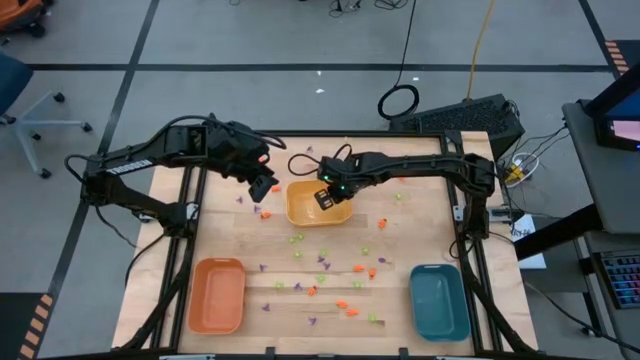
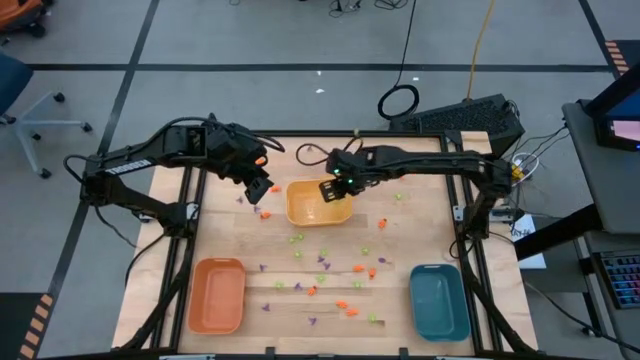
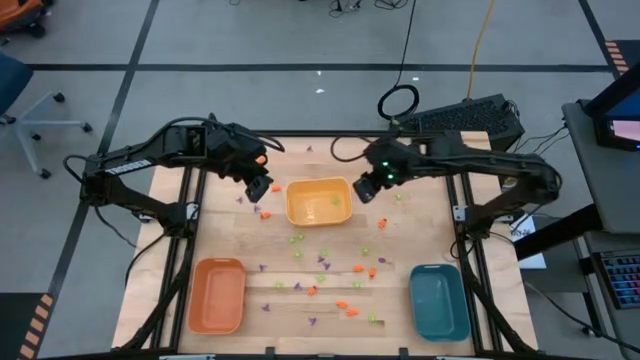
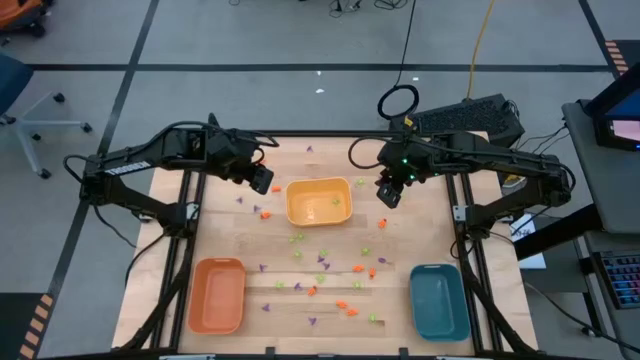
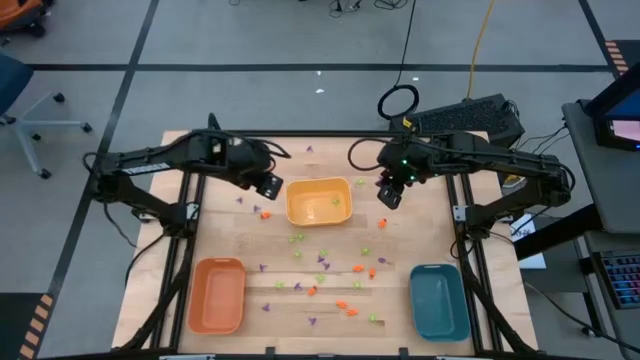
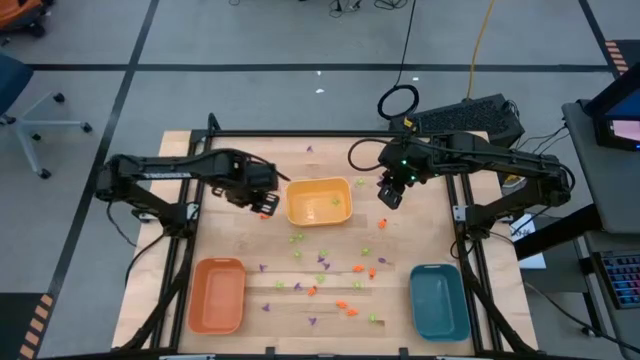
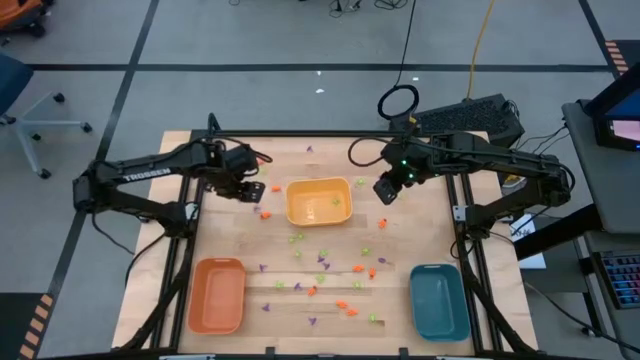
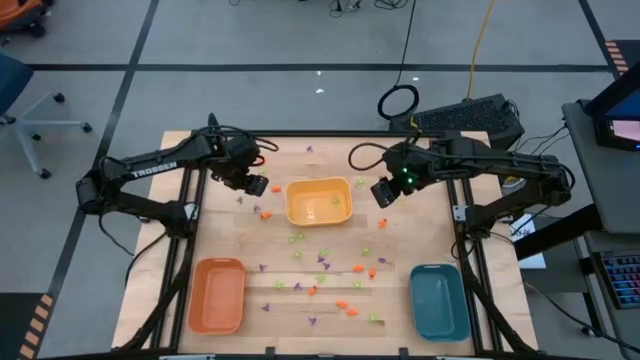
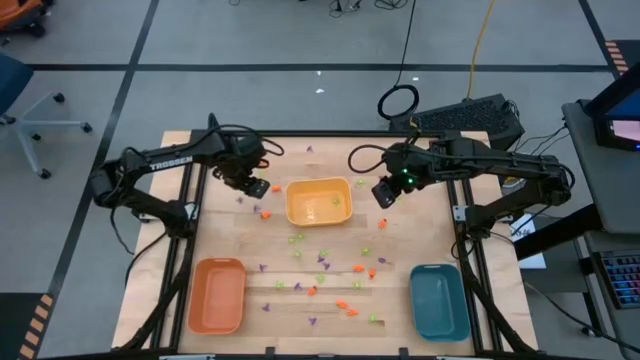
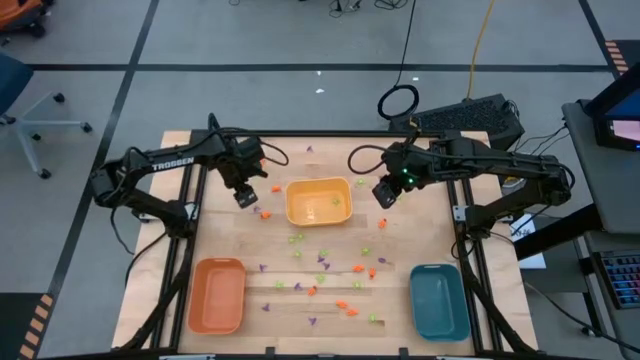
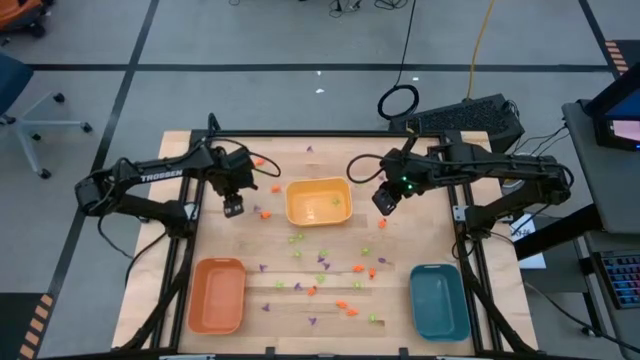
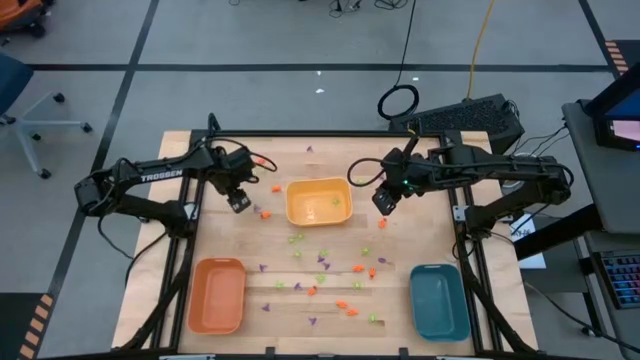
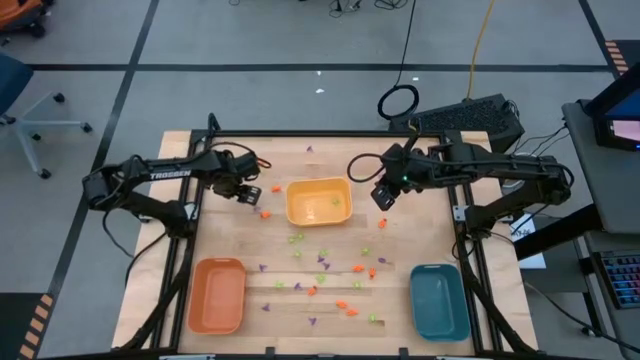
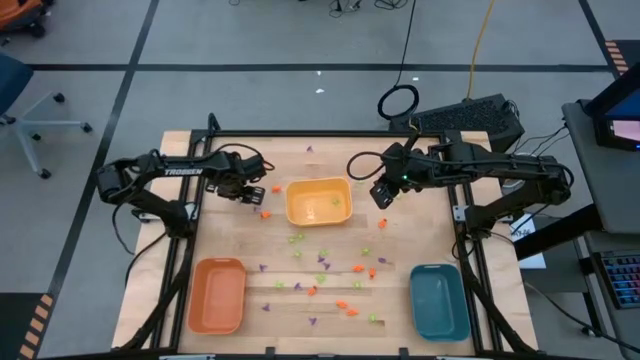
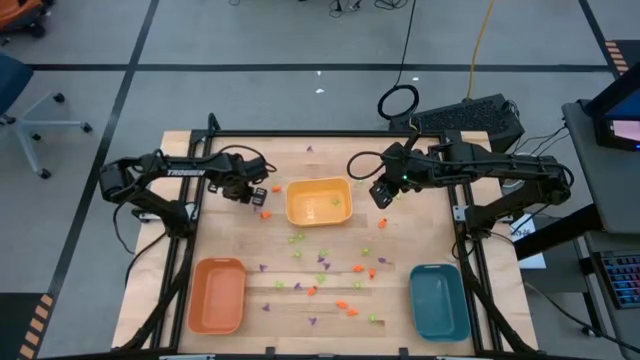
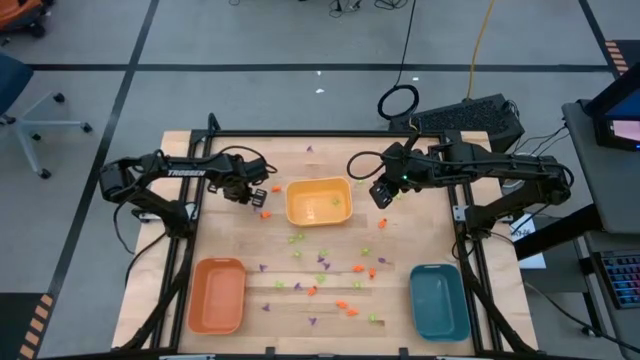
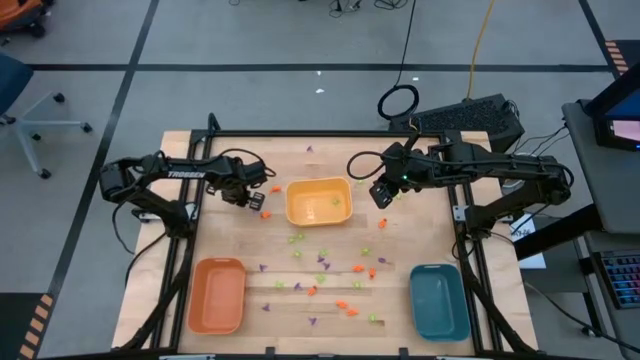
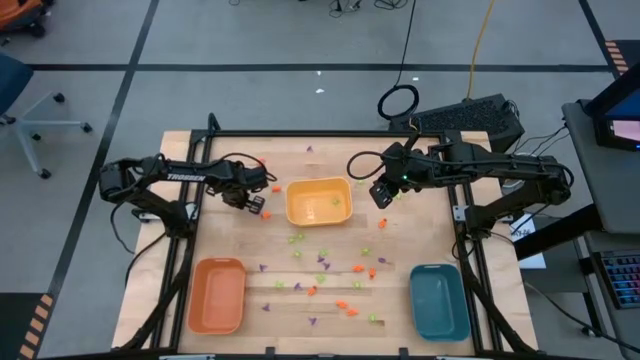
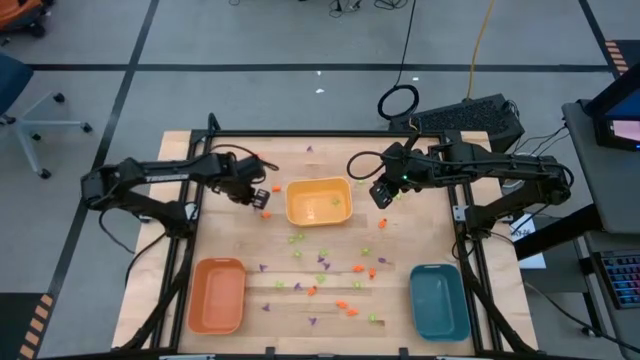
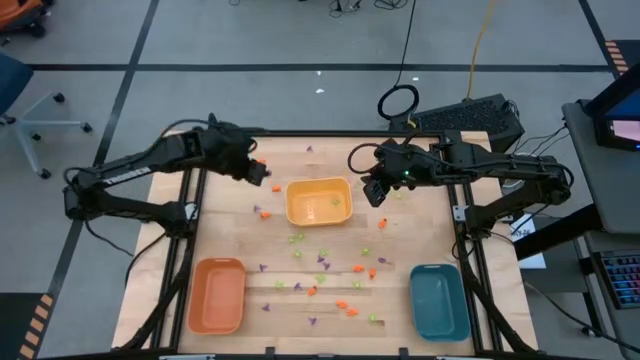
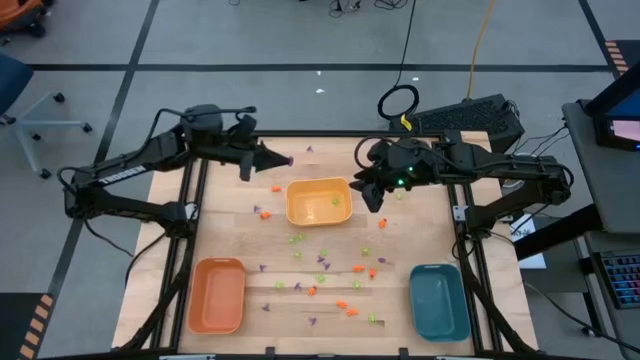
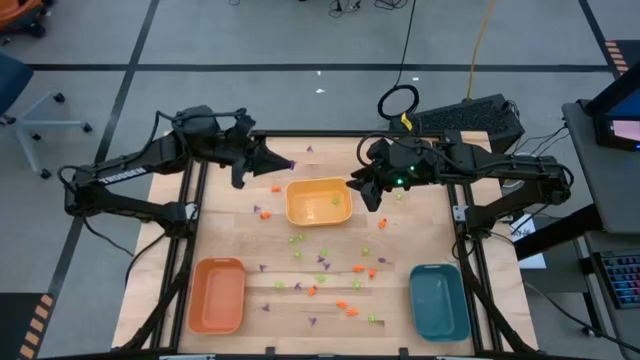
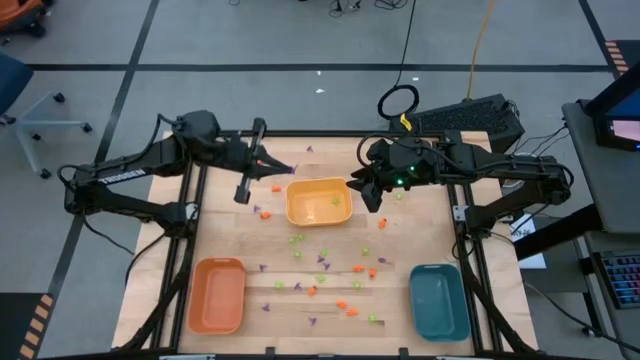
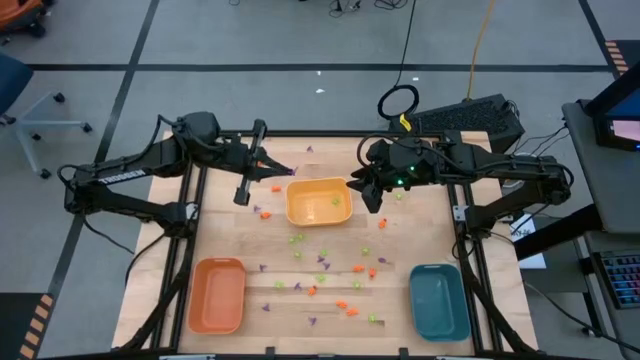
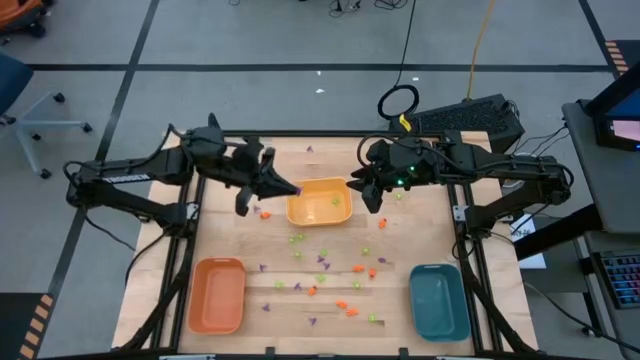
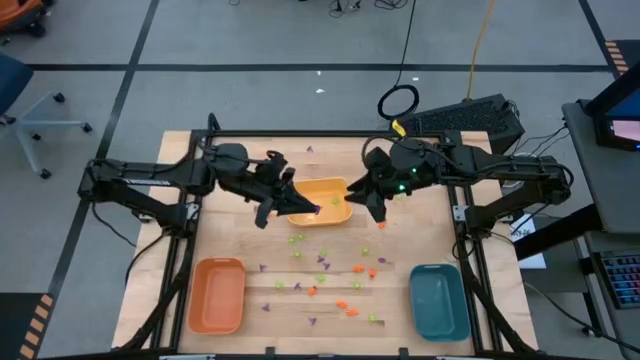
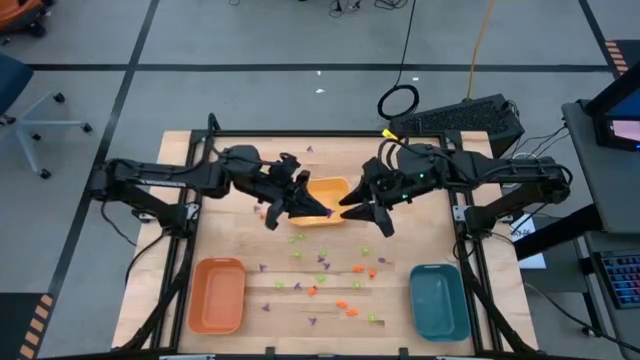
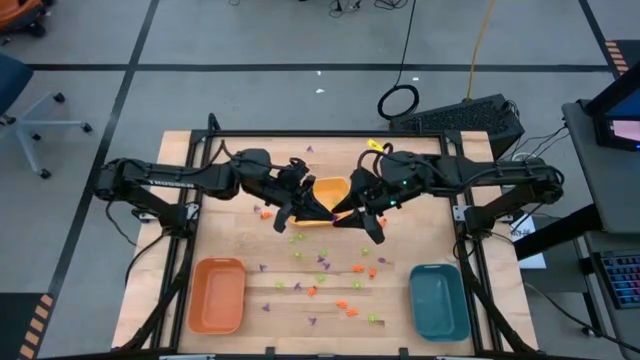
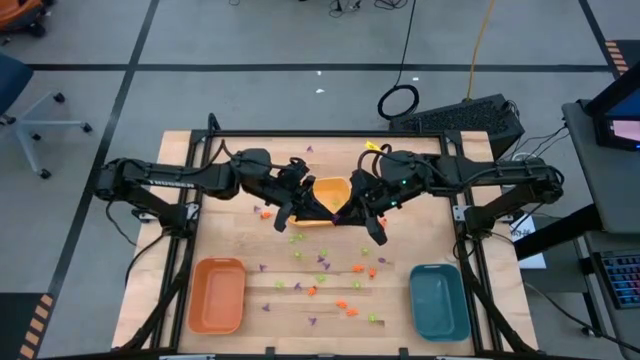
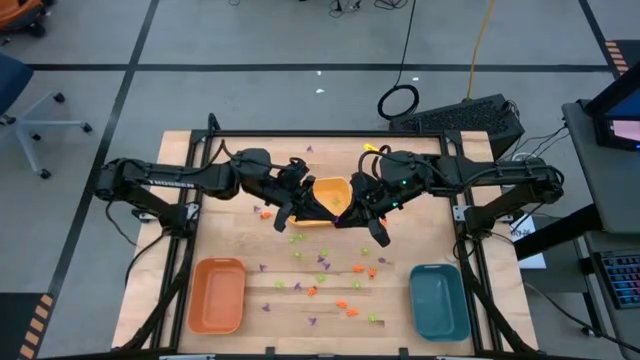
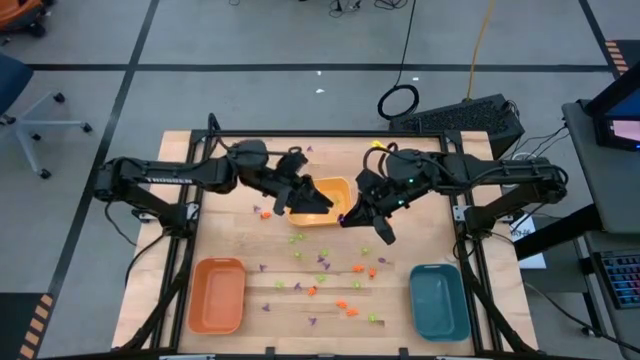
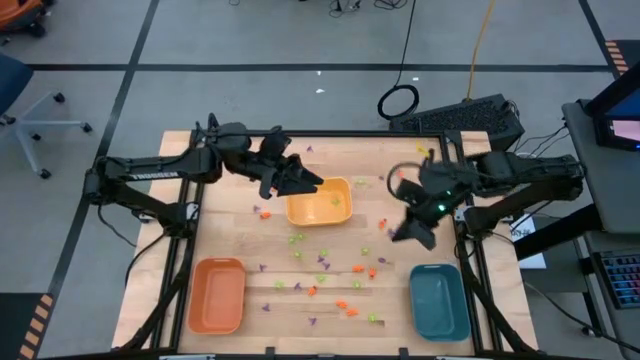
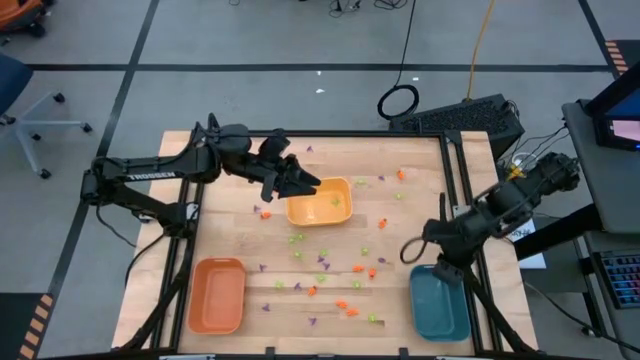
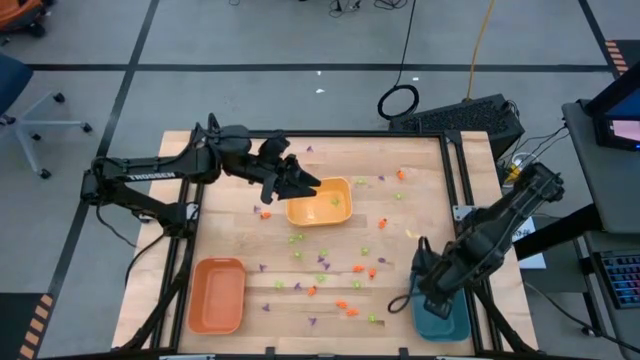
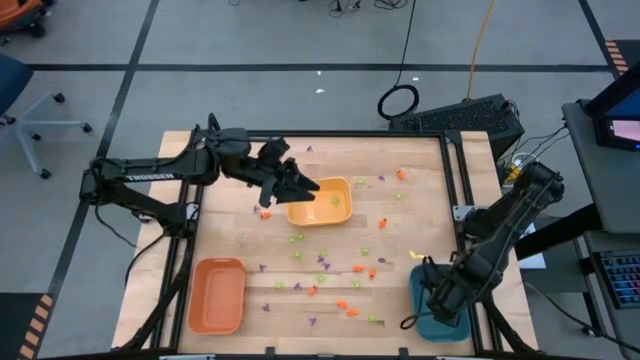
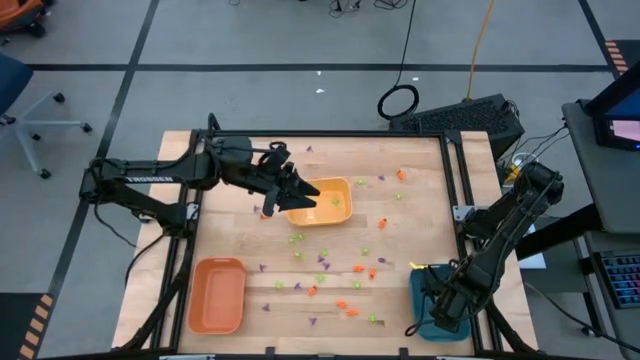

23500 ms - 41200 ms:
Task: Sort Halloween decoration
Put the violet witch hat toy into the blue bin

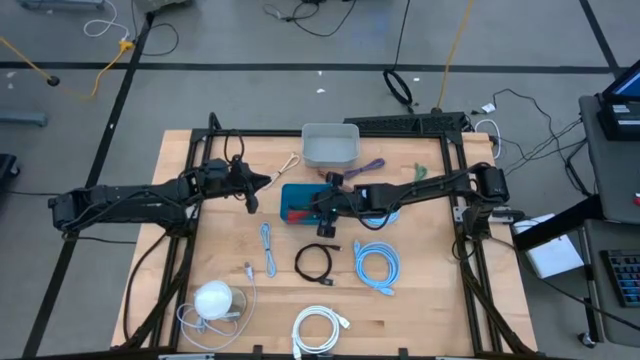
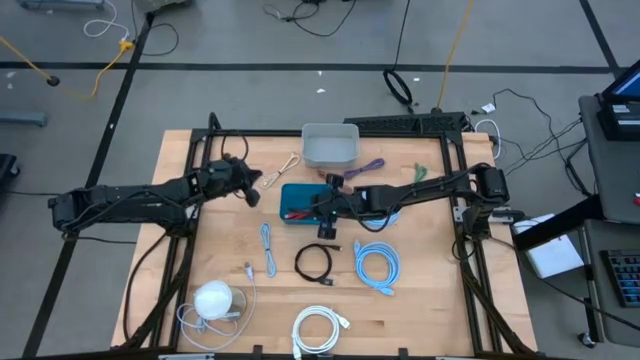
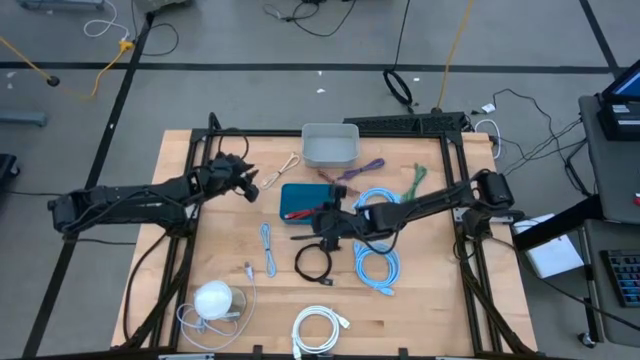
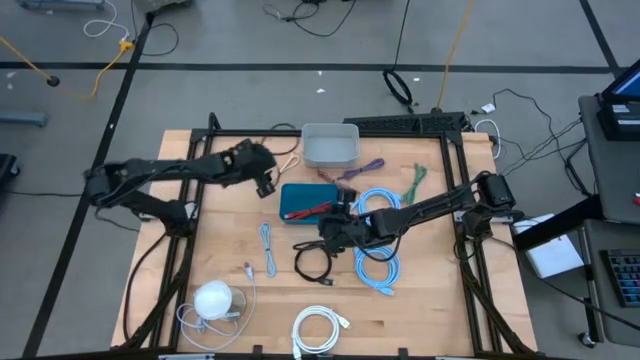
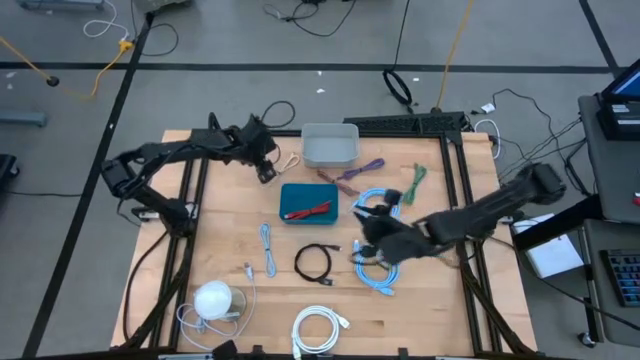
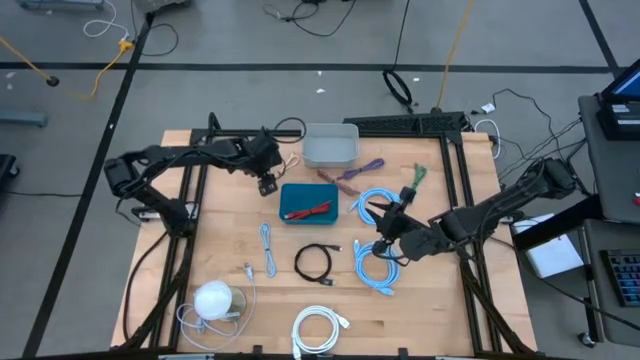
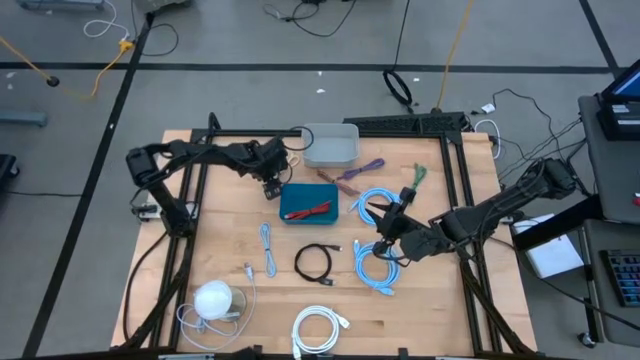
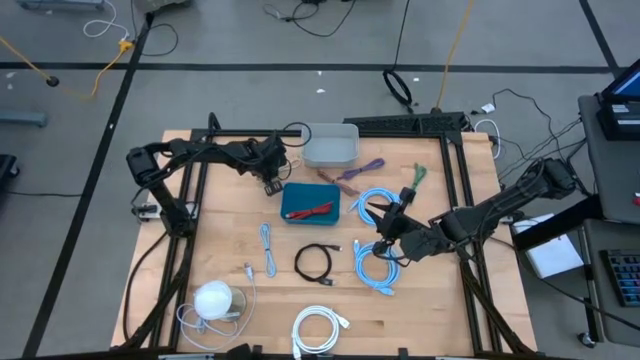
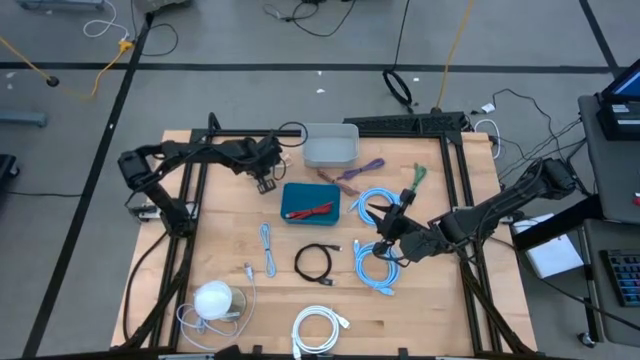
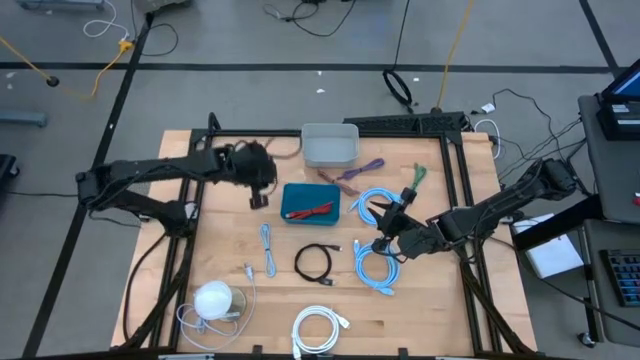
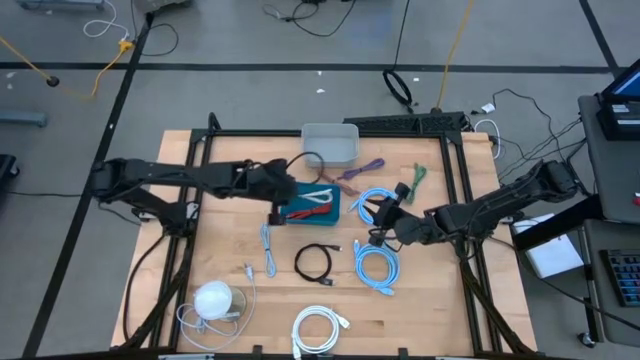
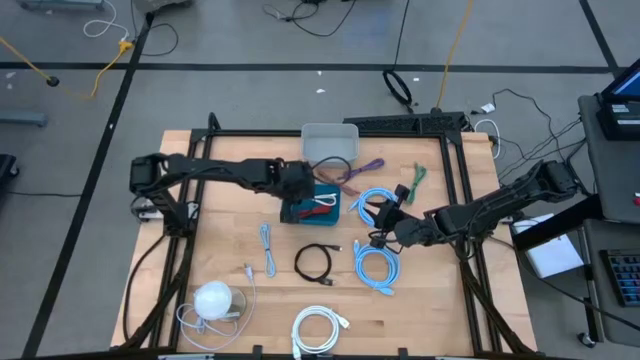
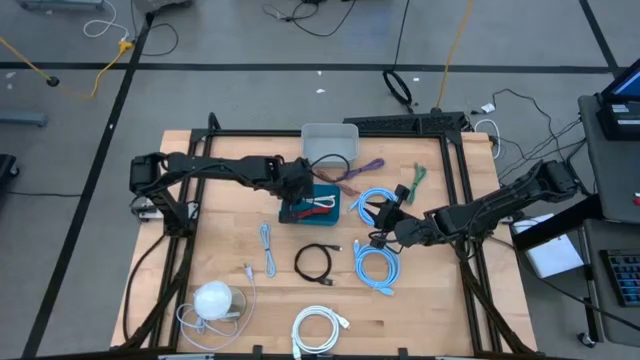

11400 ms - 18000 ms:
Task: Pick & Place USB Port
Put the white charger cable into the blue bin
